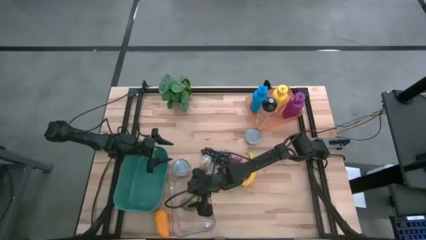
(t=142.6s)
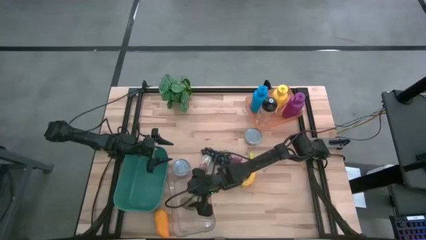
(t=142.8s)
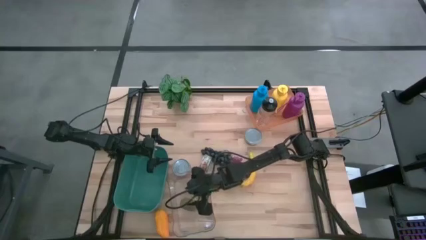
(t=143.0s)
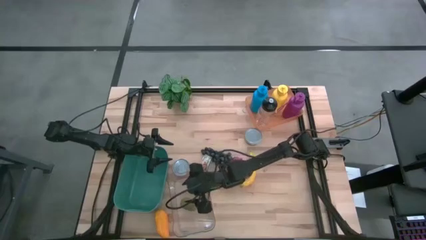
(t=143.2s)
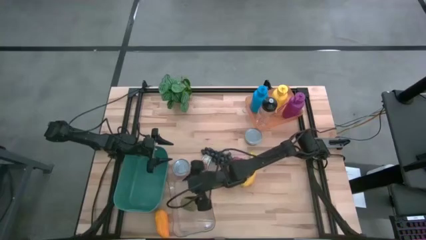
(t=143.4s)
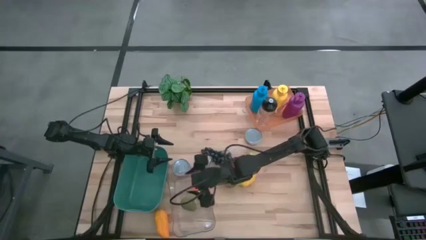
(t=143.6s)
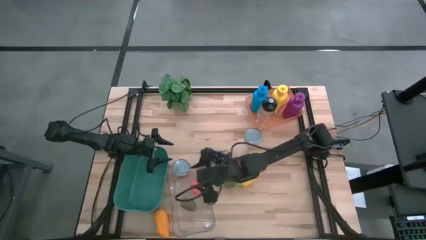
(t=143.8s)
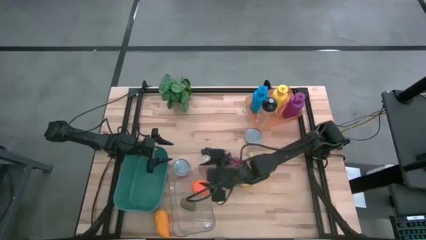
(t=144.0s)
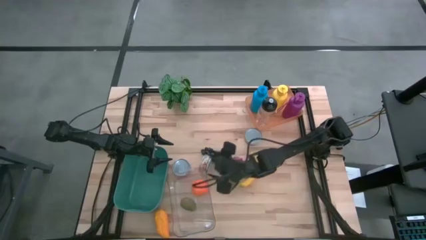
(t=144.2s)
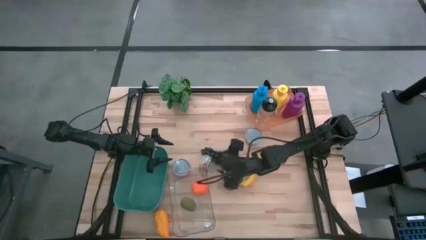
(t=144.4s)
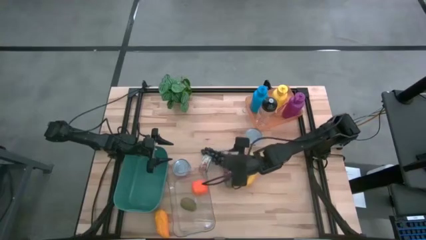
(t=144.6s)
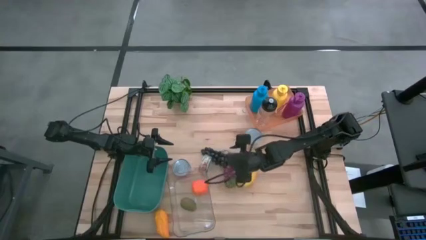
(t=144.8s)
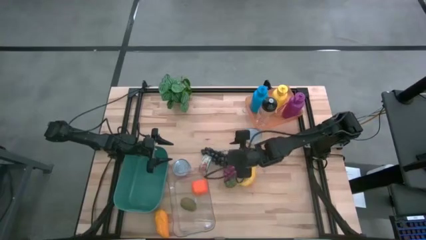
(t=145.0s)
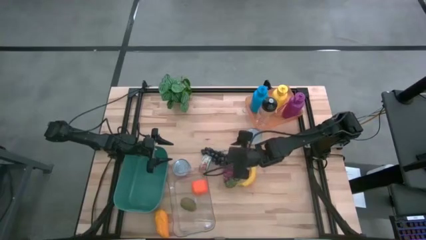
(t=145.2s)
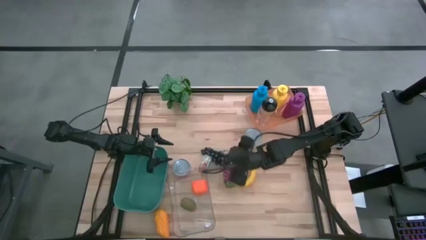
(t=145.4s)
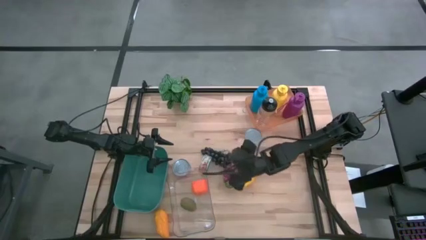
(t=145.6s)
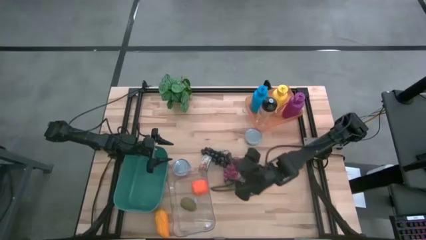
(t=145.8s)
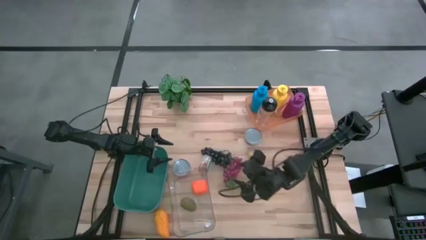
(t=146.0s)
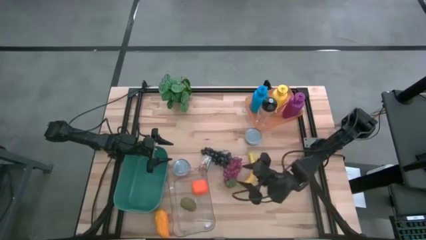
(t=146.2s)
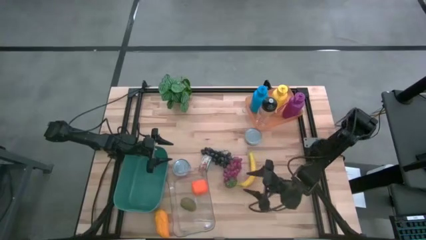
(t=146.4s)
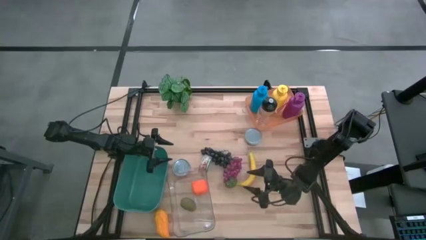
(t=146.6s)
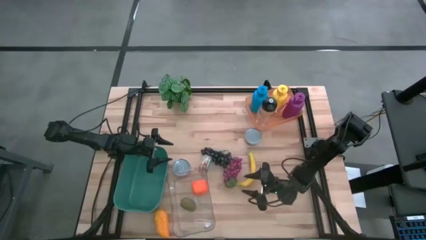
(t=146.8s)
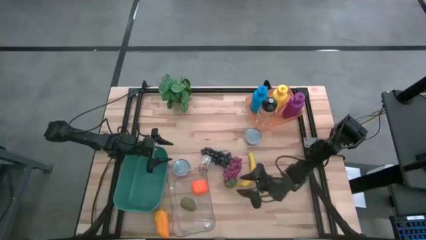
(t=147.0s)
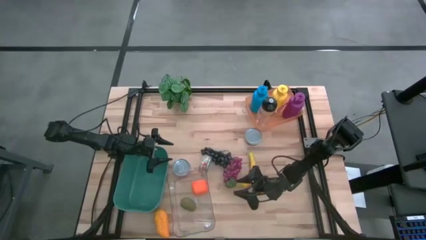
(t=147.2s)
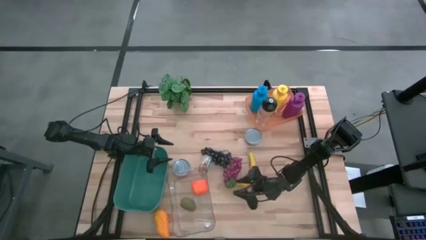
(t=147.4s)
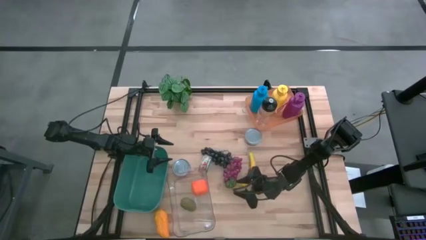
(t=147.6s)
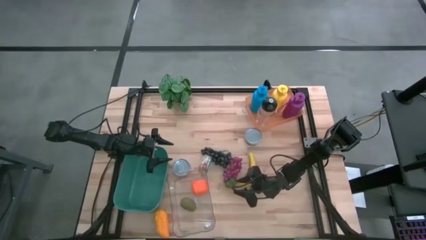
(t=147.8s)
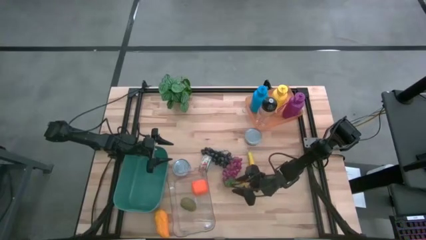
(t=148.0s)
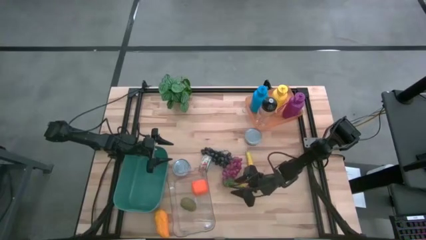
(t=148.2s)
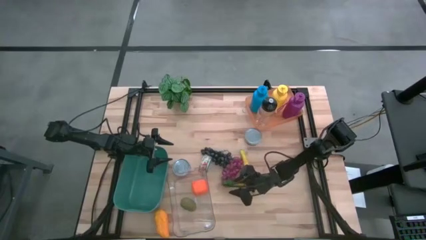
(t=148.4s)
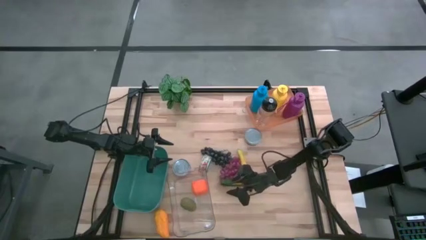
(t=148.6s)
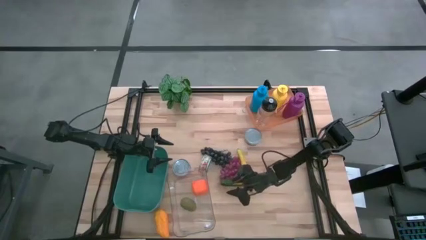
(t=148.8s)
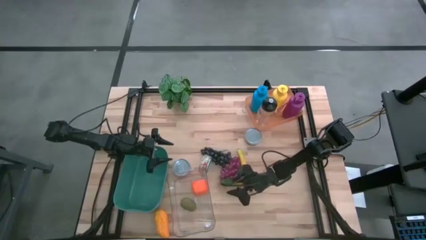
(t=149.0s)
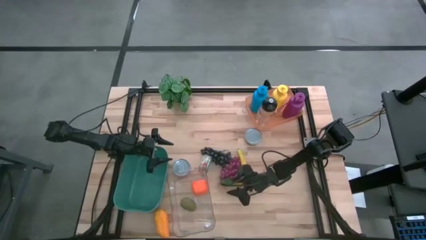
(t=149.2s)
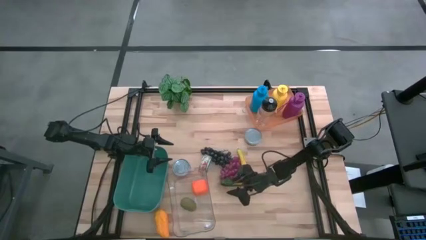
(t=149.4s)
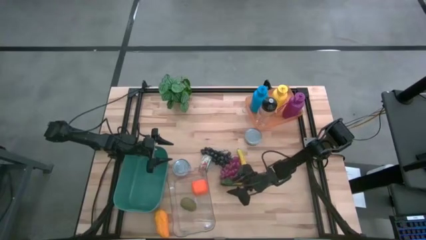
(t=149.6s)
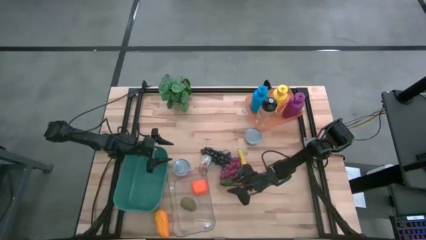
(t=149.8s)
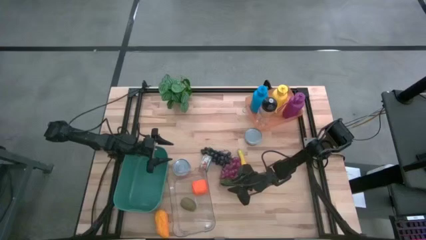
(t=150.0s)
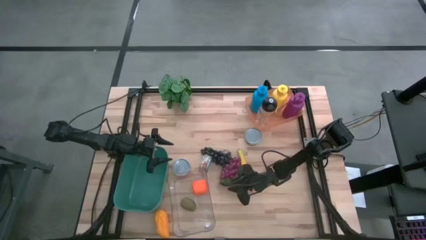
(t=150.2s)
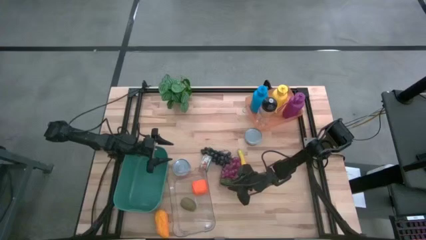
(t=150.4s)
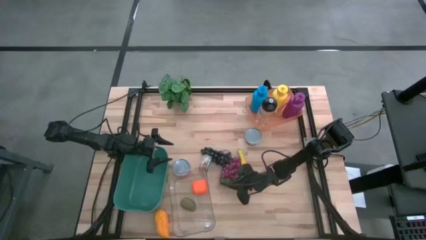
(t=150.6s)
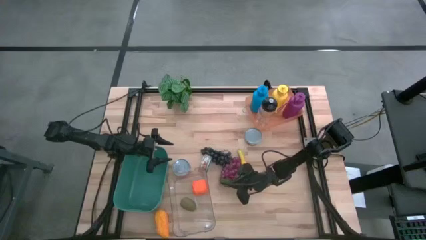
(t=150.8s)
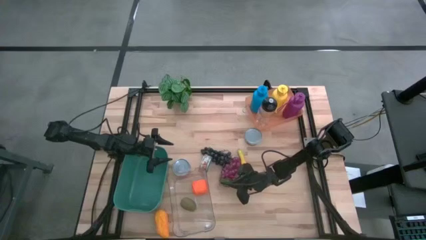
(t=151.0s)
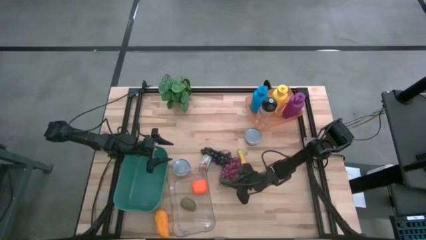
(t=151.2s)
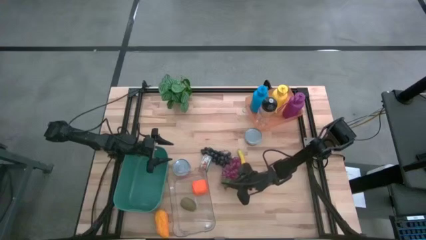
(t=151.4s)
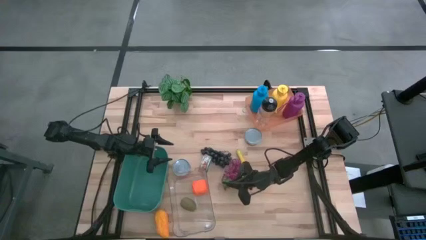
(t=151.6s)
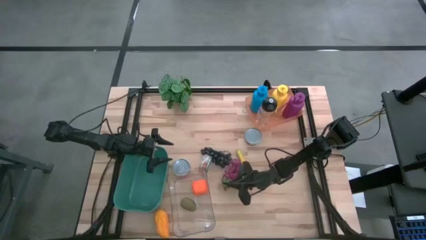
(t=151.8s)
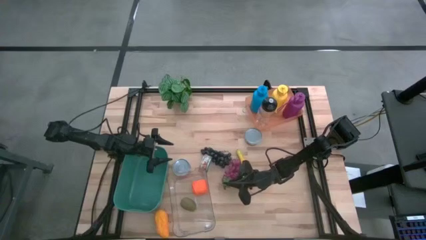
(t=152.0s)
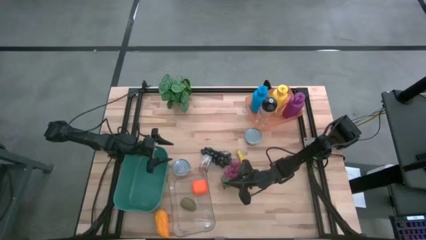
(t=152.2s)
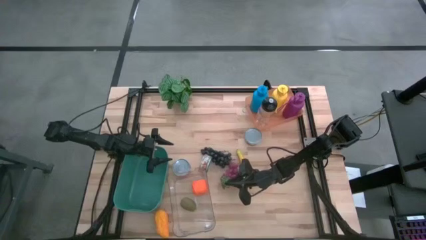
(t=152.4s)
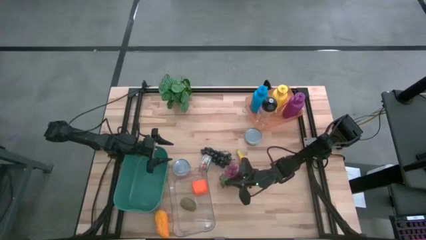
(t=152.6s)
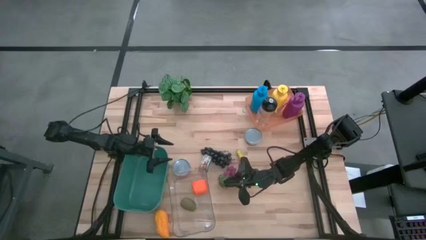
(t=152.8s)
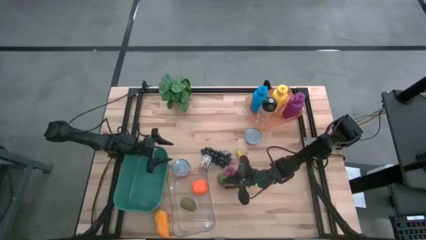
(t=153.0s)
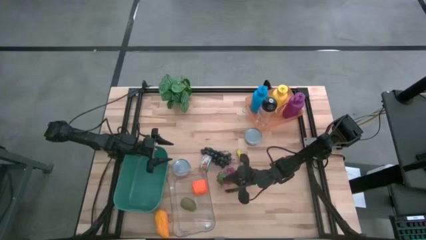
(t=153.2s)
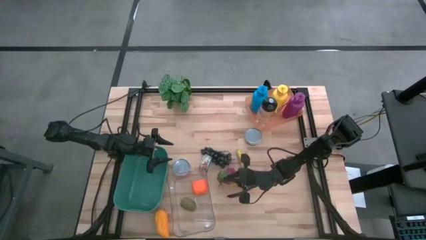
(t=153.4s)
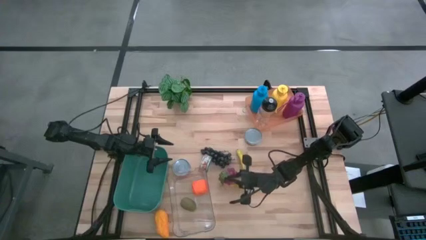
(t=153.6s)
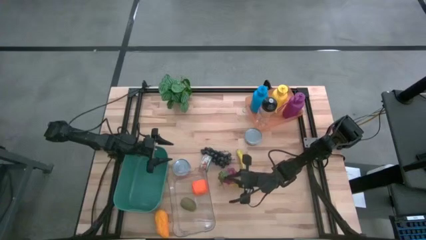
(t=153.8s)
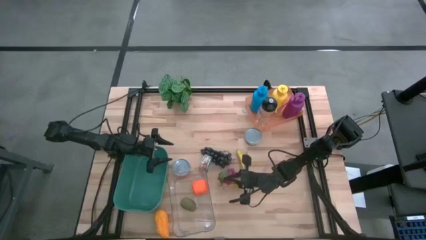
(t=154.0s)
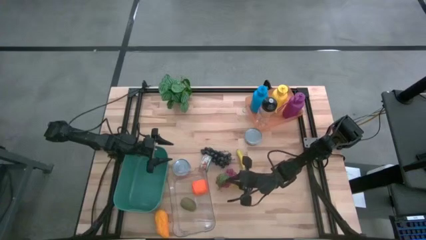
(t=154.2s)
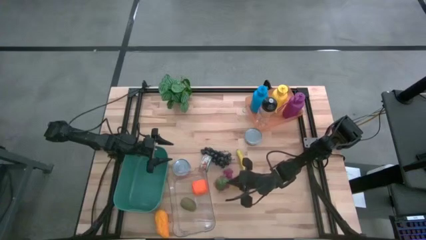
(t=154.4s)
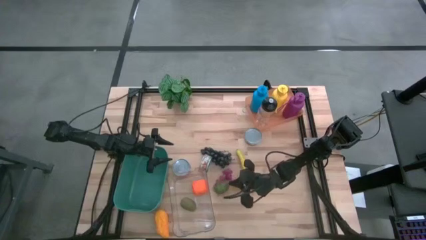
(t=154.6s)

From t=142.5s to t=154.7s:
Task: Pick & Place Food Item
Put the red grapes into the transparent bin

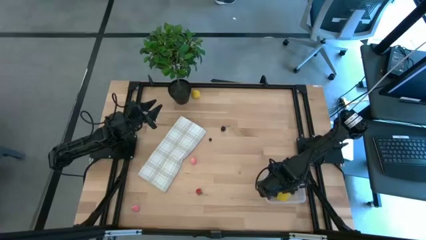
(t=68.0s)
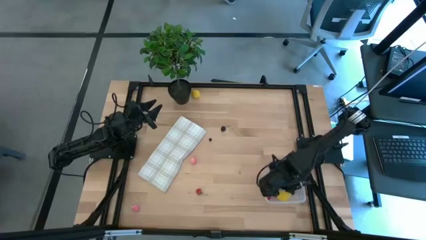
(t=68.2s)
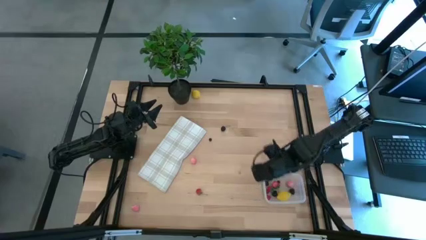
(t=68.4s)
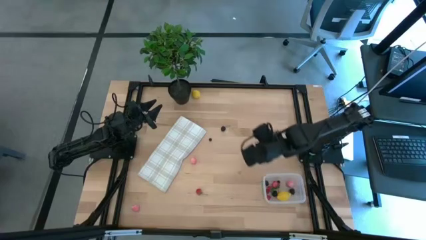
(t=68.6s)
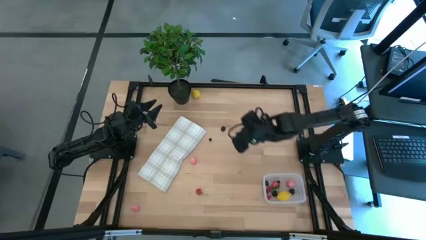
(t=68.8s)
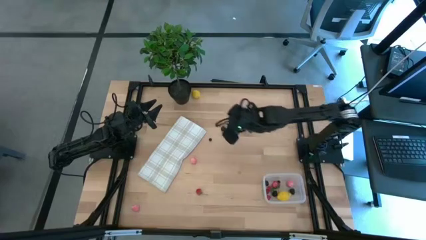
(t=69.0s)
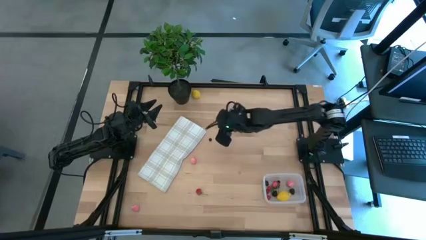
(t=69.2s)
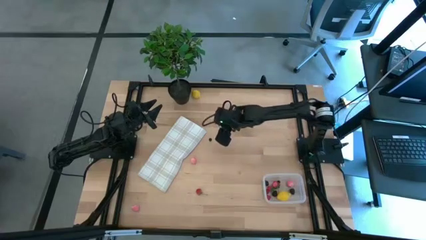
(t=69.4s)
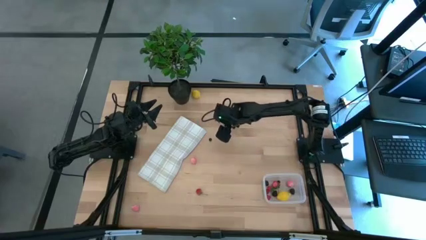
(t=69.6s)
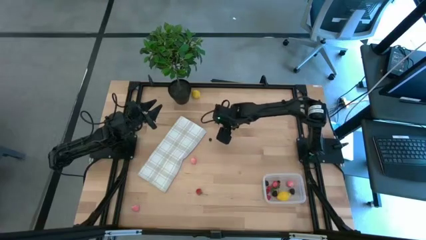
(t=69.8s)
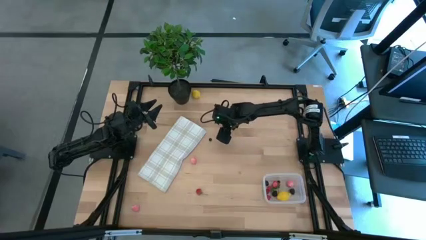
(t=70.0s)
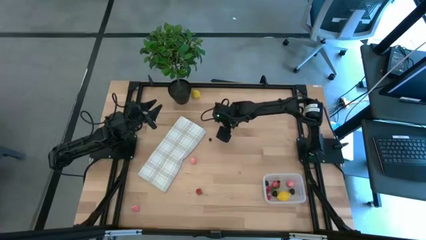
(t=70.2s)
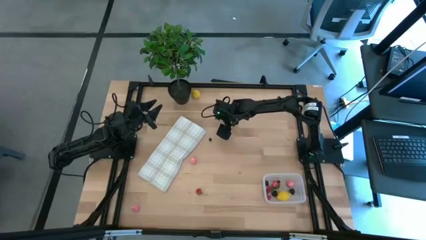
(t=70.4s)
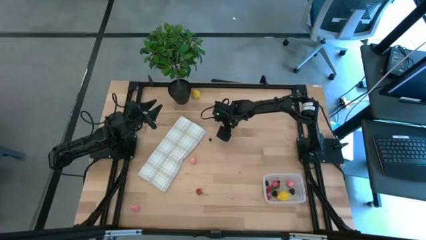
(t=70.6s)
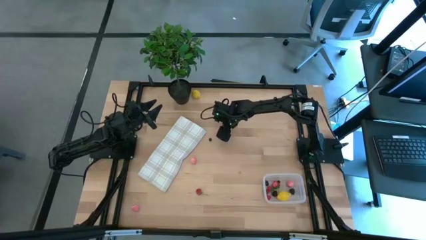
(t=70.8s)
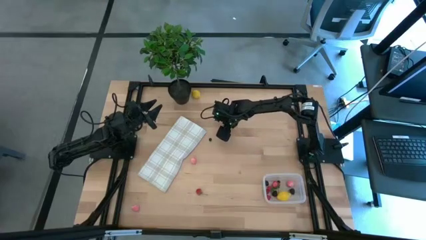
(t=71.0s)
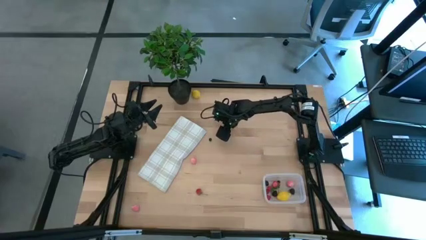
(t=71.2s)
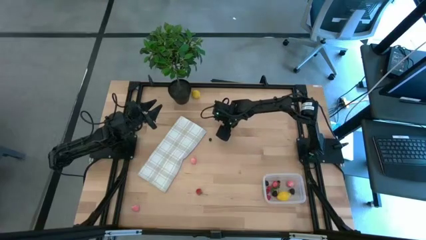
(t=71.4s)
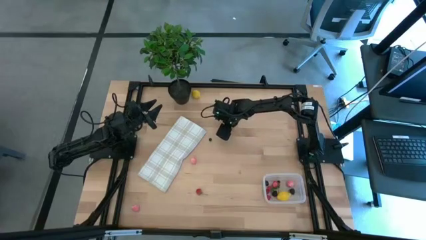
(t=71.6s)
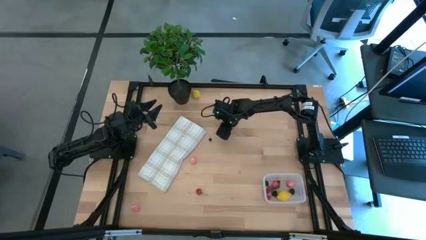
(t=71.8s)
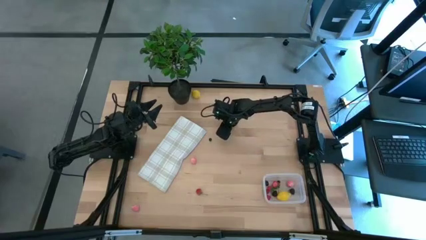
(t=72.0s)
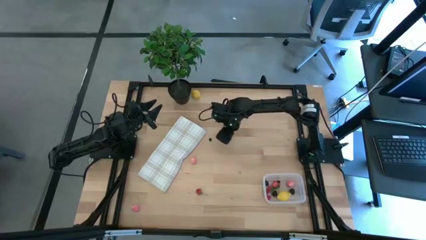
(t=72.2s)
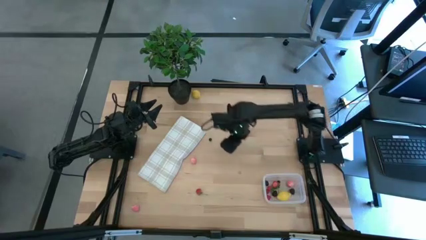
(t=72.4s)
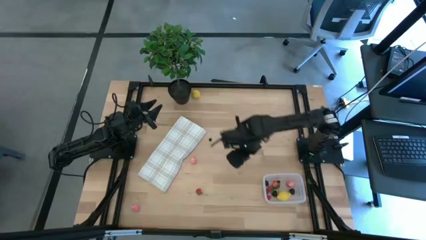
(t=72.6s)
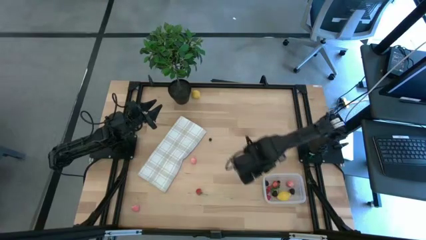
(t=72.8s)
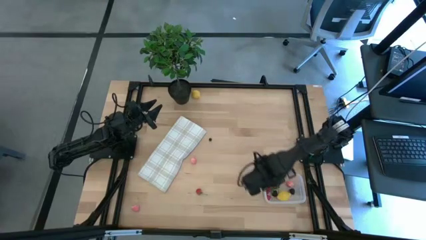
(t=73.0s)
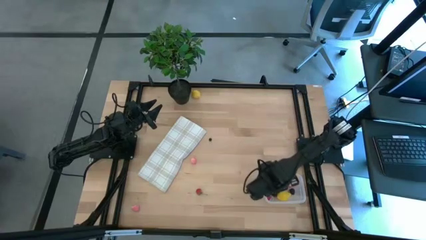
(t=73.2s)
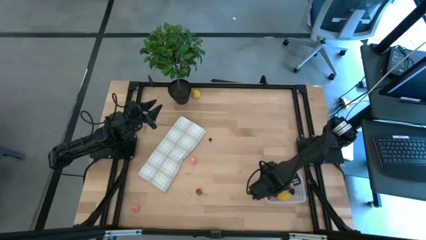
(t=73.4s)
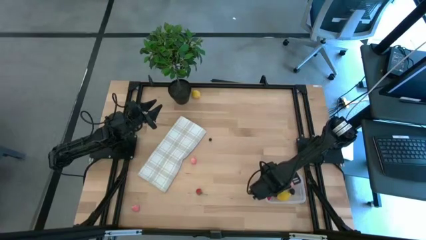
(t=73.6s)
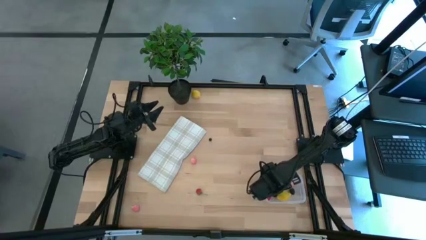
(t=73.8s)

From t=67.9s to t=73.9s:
Task: Pick and placing Produce into tupperware
Put the black cherry into the transparent bin
